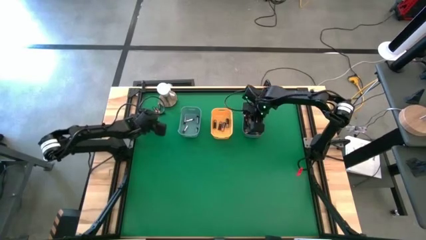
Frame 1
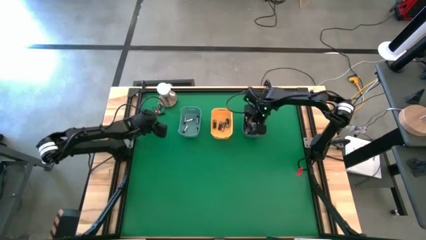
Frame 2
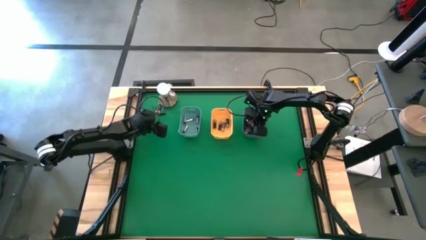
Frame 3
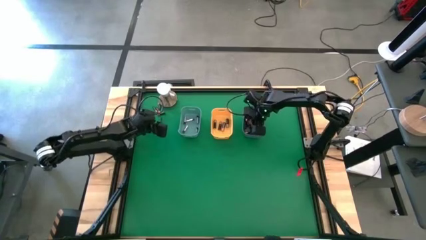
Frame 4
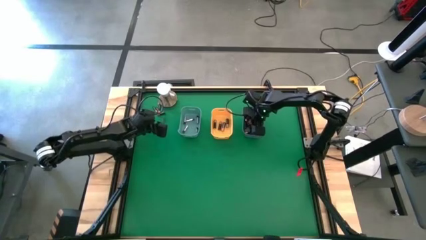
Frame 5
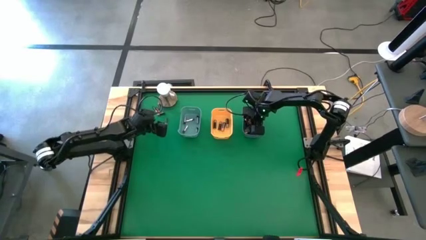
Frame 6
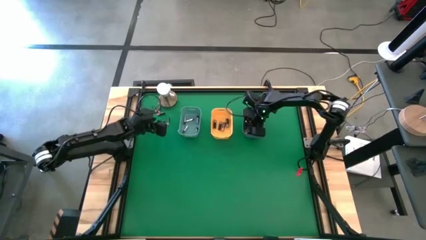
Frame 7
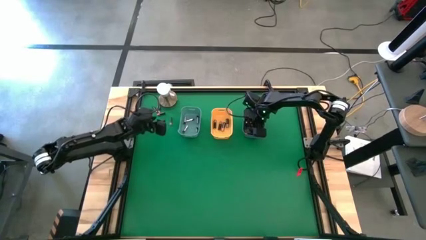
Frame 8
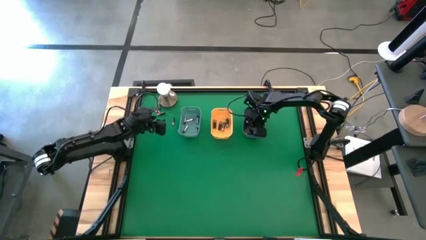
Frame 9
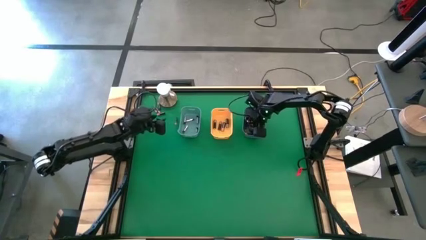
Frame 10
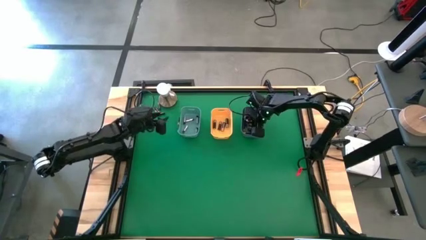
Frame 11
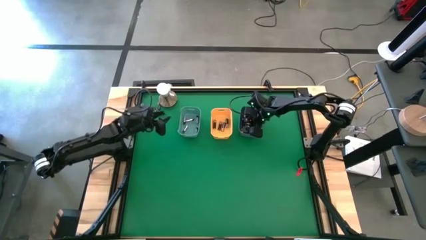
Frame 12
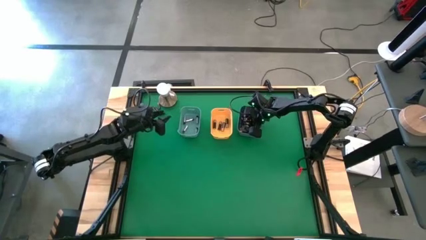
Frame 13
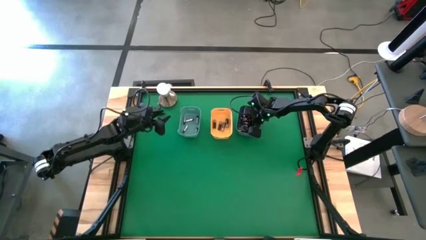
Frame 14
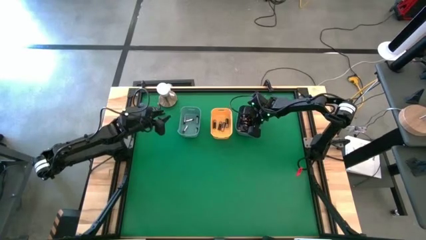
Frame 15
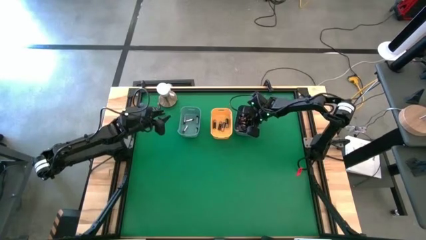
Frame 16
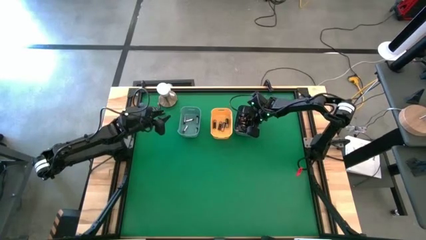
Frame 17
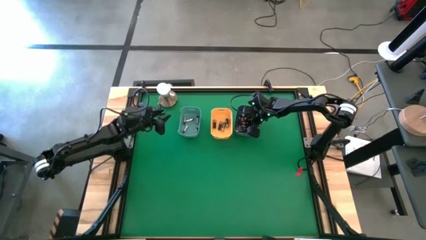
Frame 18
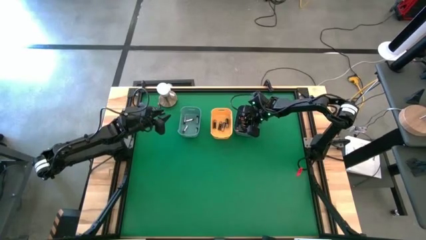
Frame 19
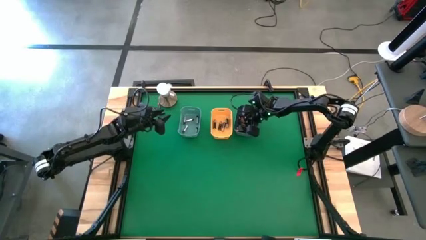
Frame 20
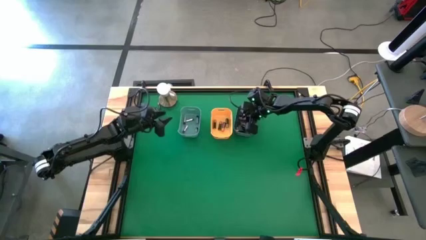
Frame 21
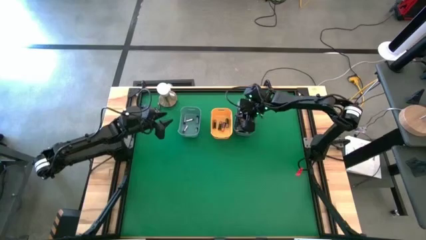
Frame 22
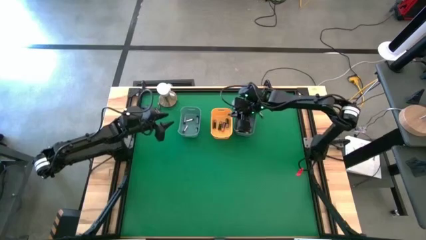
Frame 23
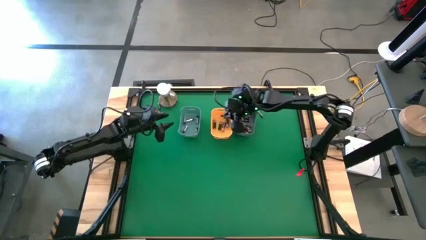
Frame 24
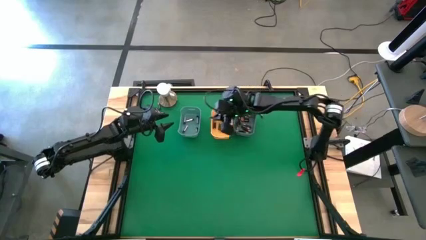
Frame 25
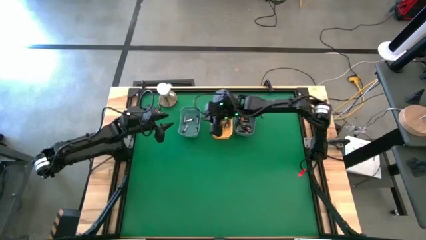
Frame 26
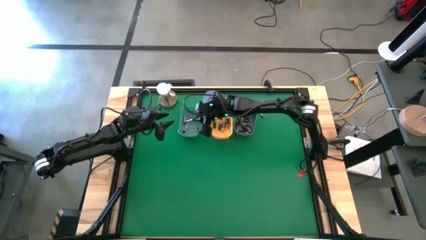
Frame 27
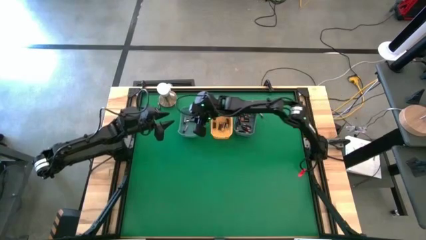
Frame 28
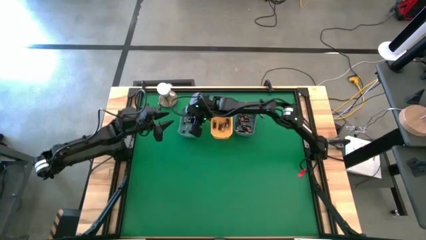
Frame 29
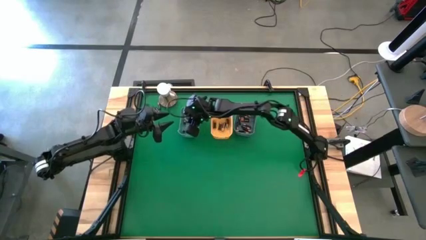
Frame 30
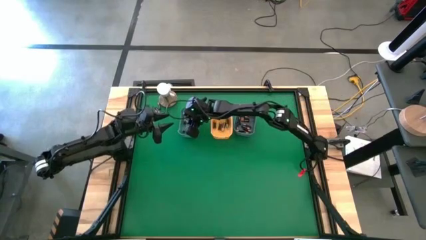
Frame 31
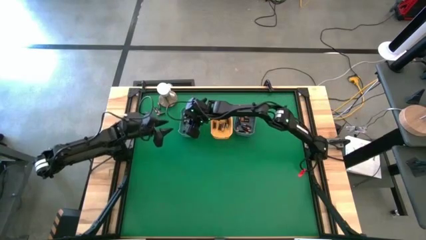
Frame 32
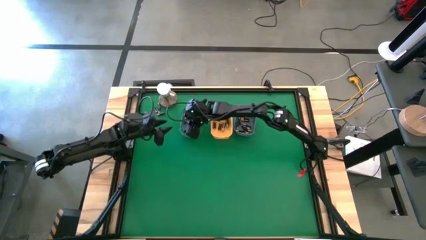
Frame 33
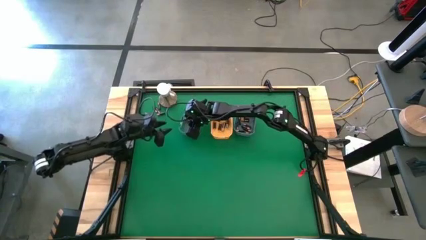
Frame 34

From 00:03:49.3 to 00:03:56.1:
Task: Sort batteries
Put the silver battery into the green bin

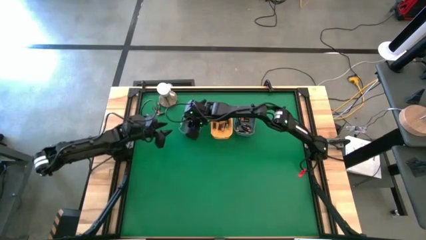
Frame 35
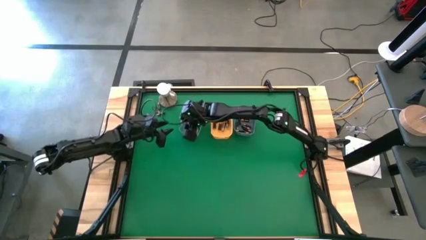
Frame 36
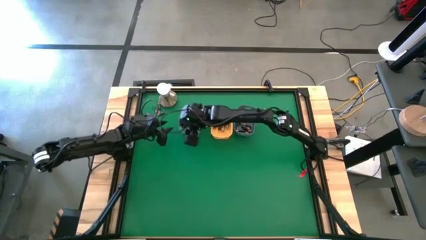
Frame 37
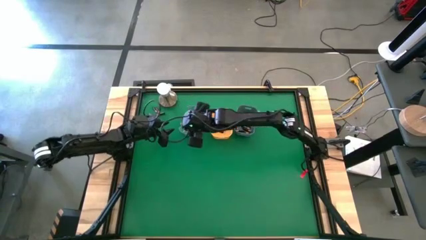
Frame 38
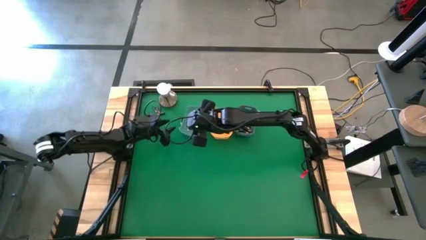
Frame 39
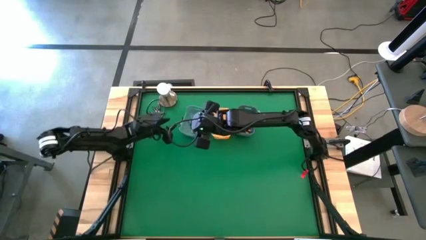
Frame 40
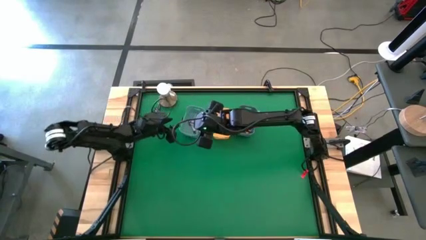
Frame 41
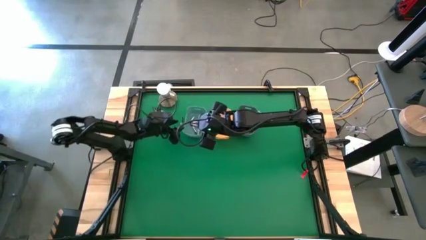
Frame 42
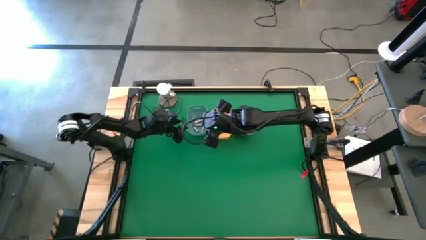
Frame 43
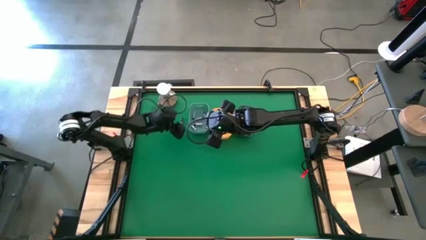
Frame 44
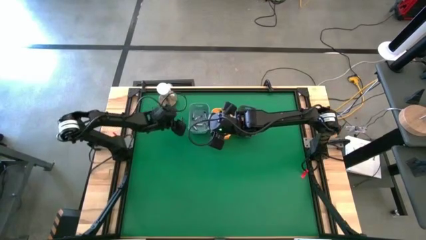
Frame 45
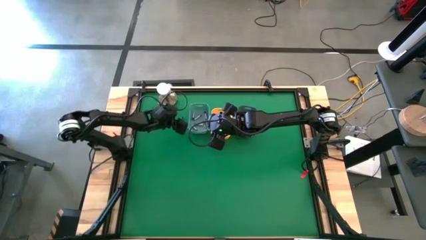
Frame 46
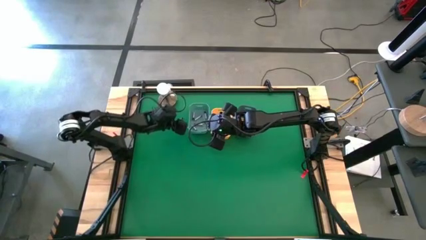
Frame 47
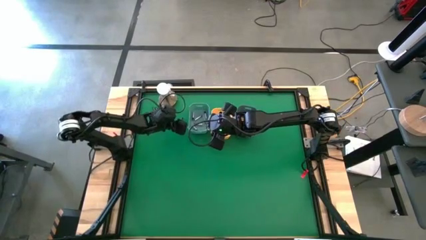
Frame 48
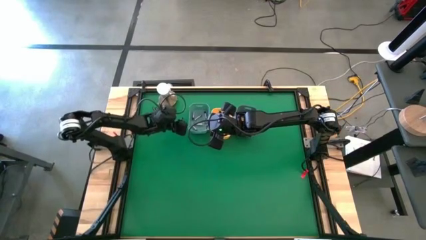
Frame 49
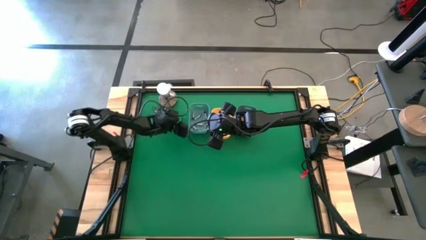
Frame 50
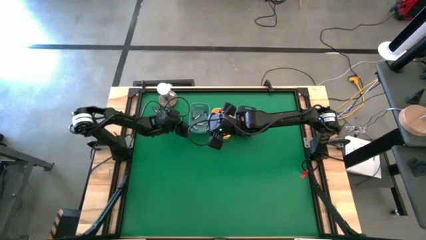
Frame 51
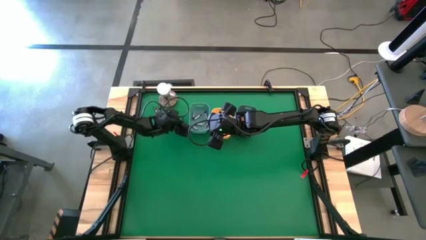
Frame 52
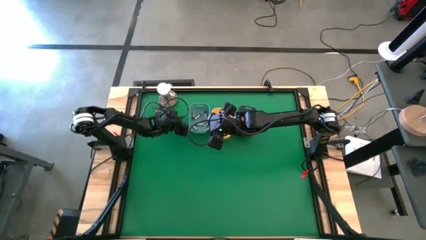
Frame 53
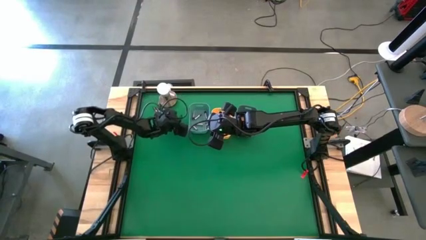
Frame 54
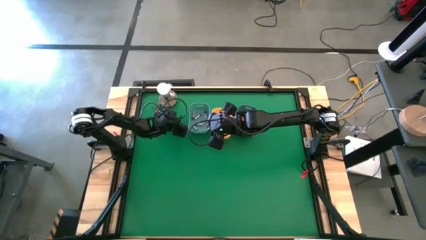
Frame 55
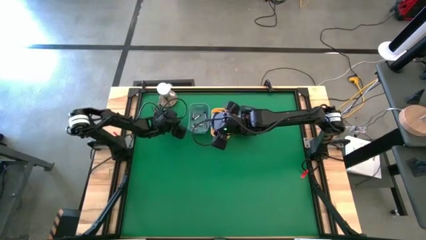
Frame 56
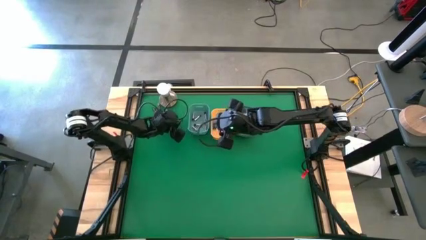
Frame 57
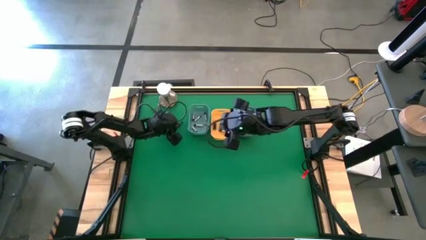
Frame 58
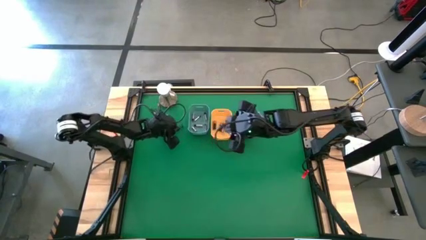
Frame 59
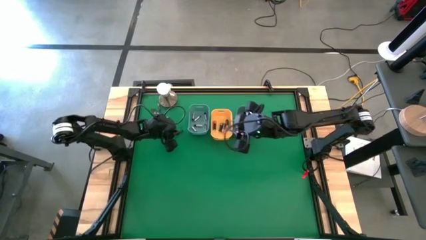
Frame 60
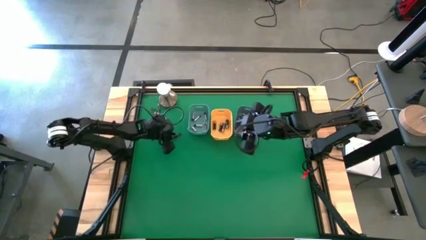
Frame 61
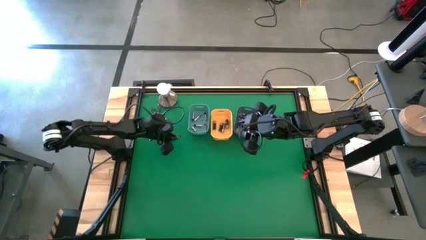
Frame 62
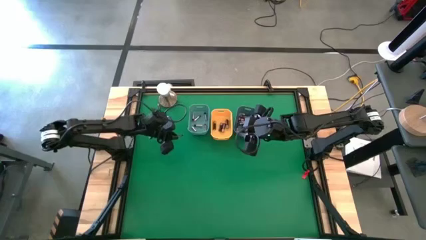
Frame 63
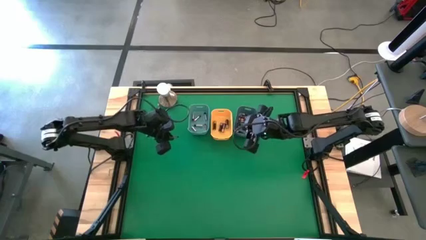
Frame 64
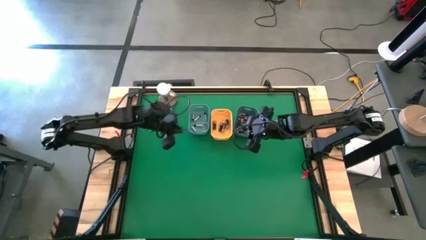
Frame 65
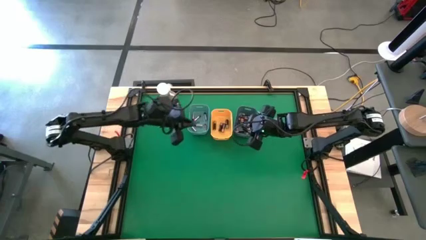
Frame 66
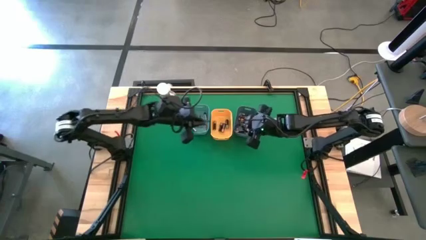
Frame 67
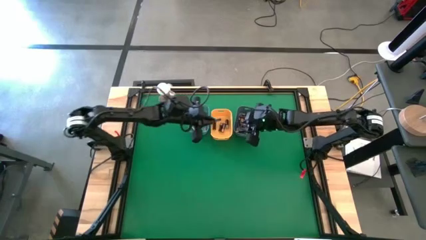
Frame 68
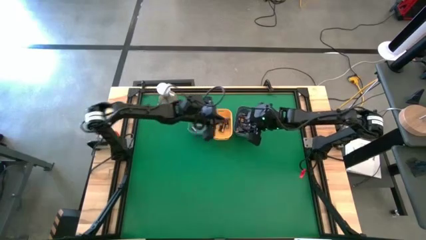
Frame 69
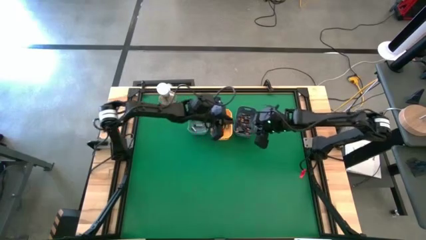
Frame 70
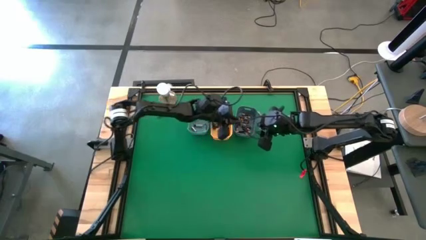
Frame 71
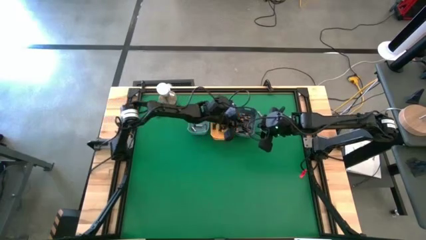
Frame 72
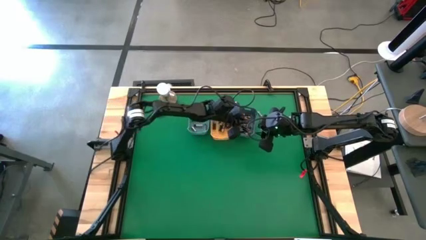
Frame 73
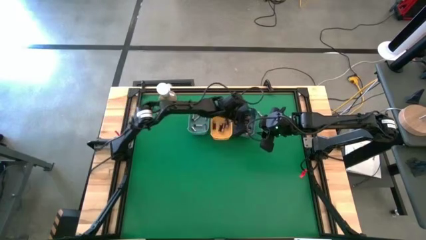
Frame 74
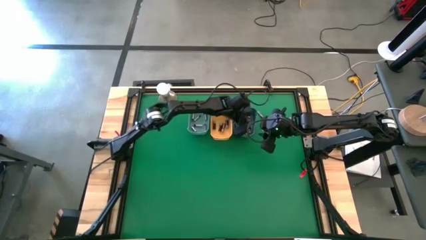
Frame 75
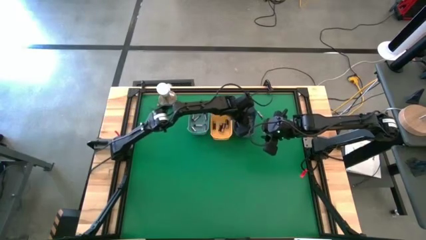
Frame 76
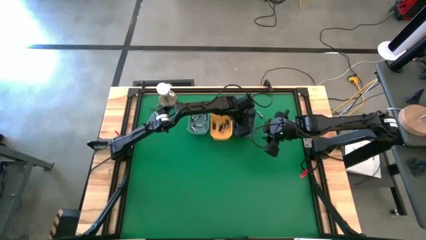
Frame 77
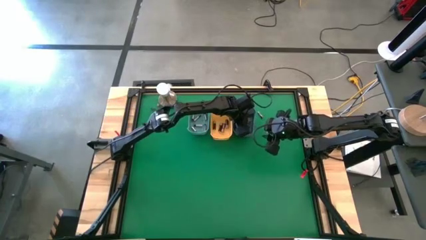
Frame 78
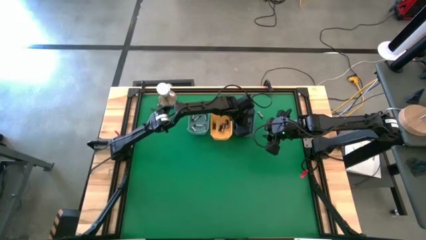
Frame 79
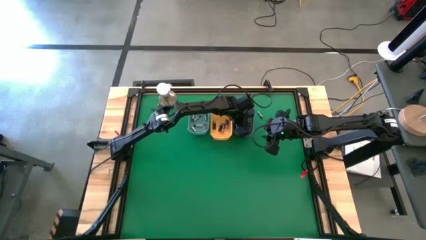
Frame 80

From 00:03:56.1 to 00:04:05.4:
Put the small black battery into the blue bin
